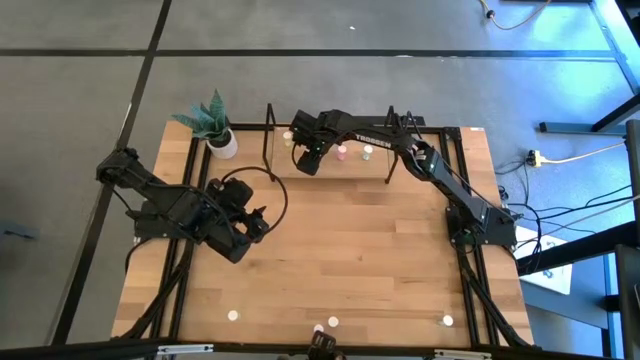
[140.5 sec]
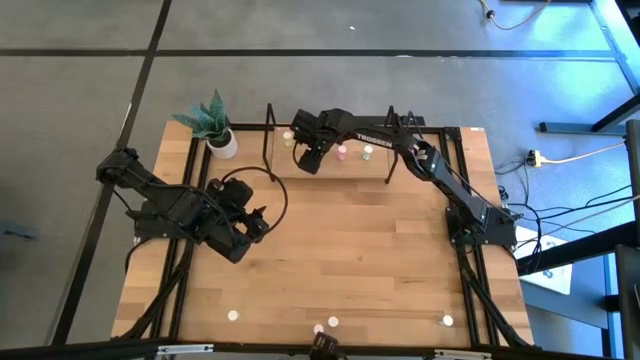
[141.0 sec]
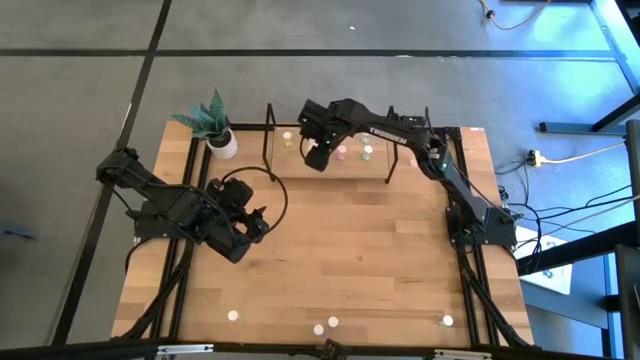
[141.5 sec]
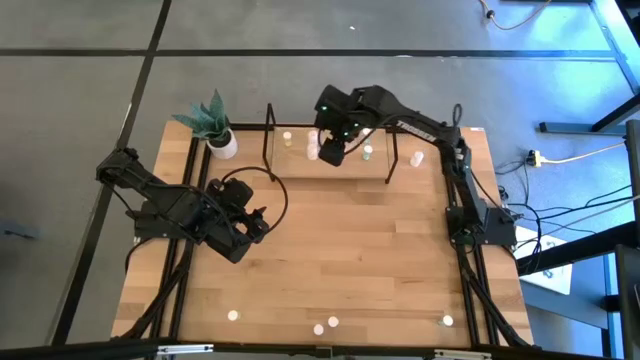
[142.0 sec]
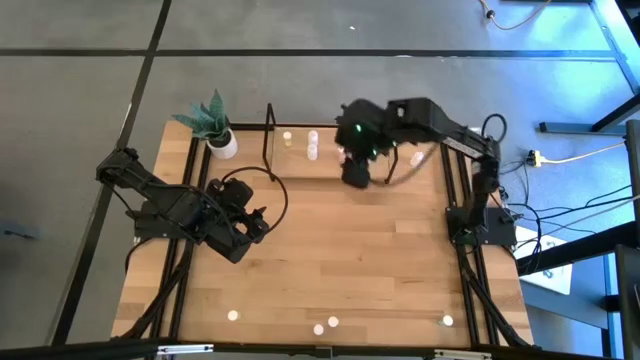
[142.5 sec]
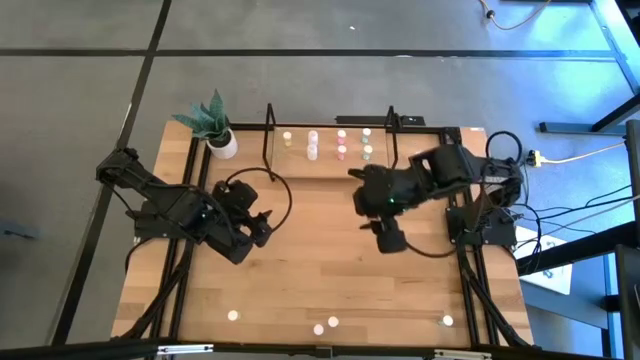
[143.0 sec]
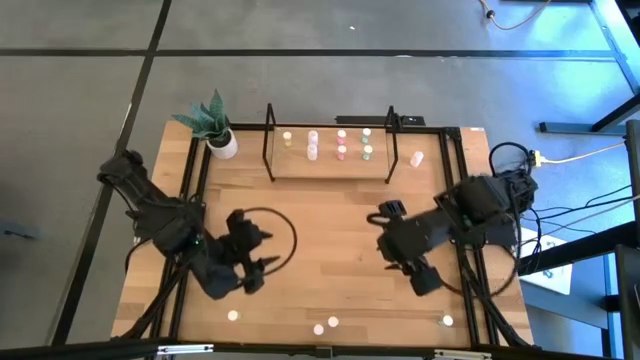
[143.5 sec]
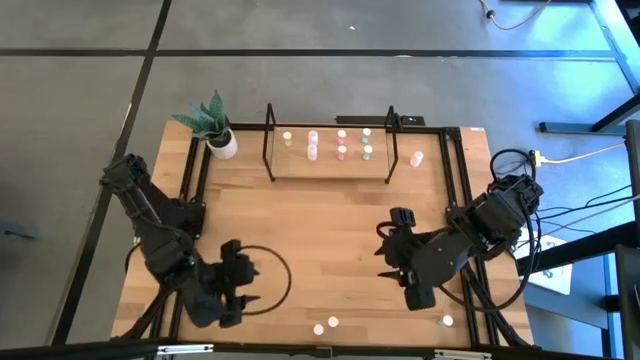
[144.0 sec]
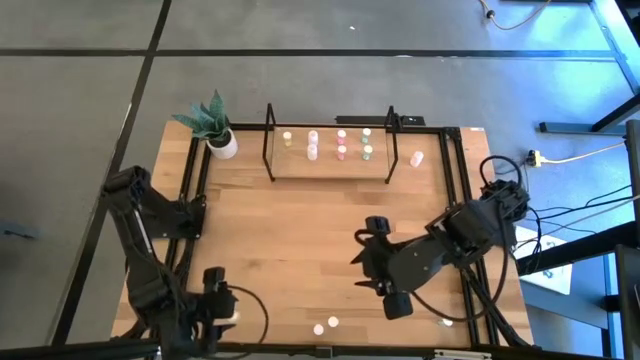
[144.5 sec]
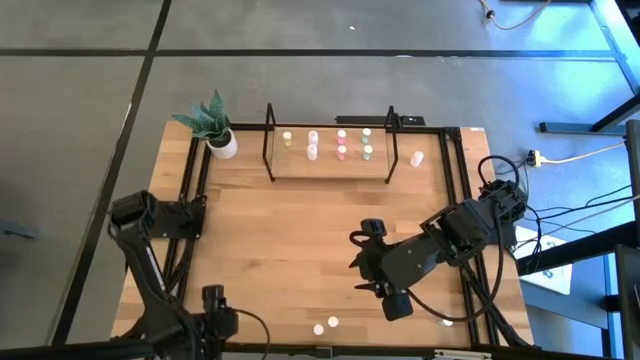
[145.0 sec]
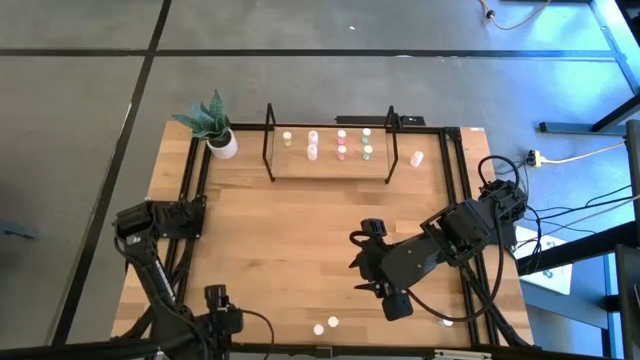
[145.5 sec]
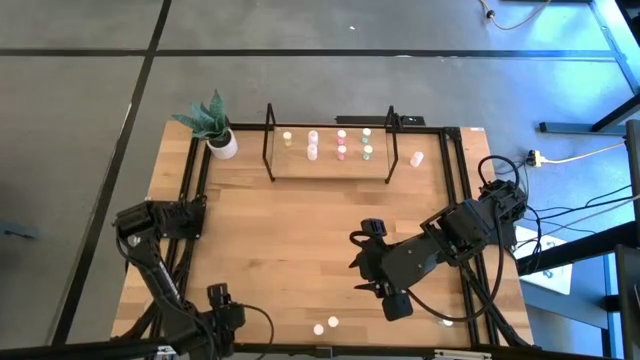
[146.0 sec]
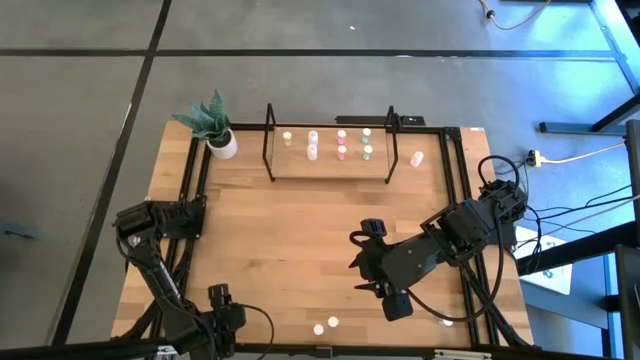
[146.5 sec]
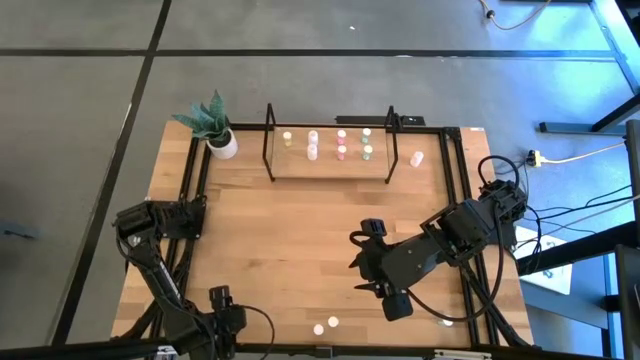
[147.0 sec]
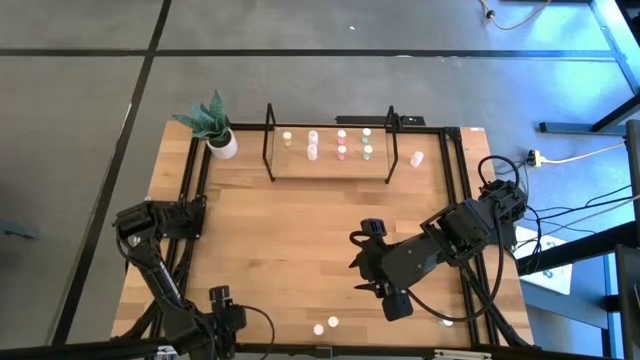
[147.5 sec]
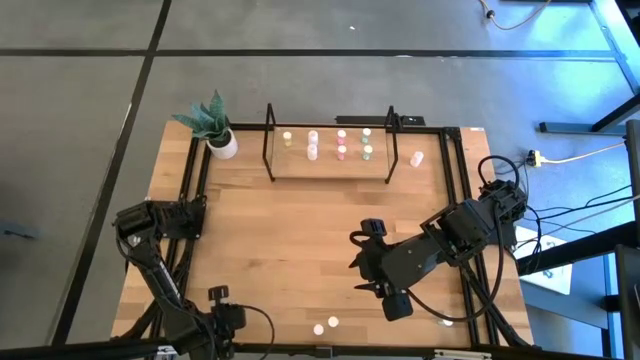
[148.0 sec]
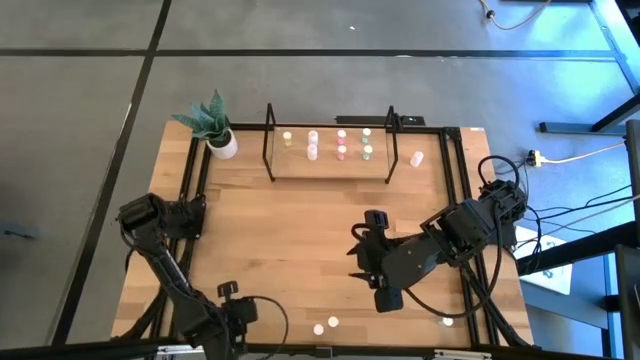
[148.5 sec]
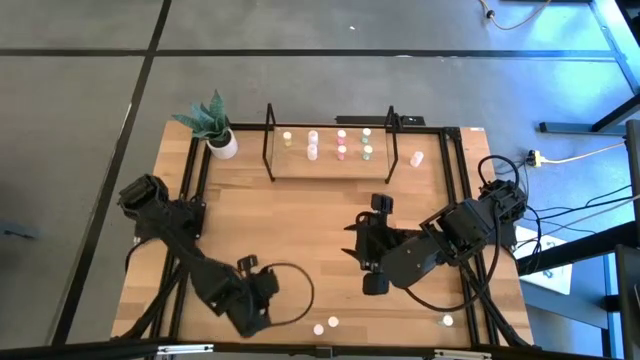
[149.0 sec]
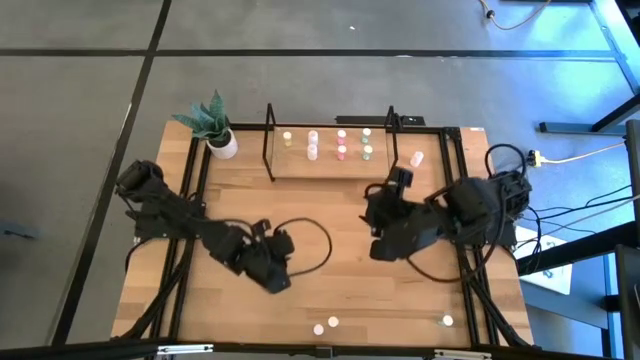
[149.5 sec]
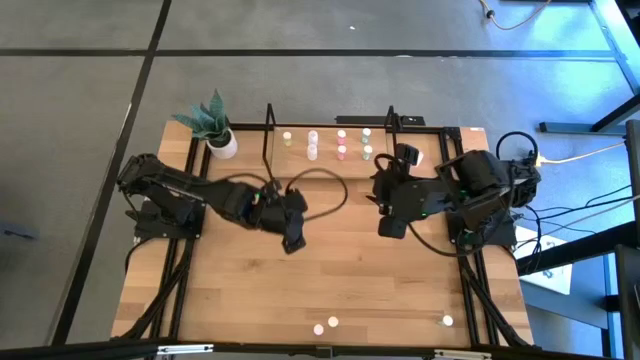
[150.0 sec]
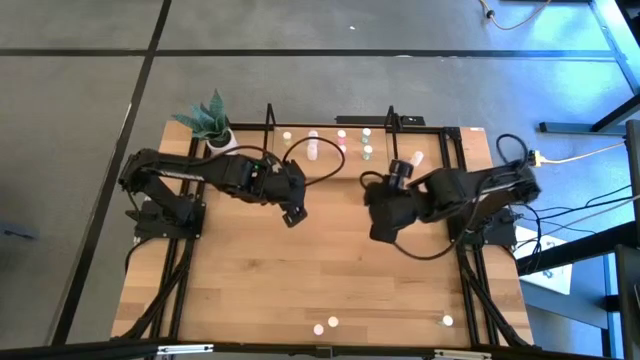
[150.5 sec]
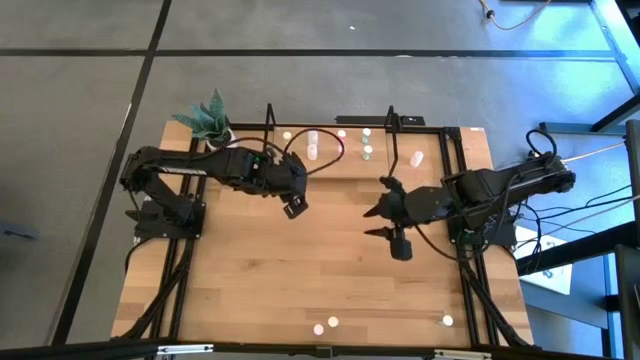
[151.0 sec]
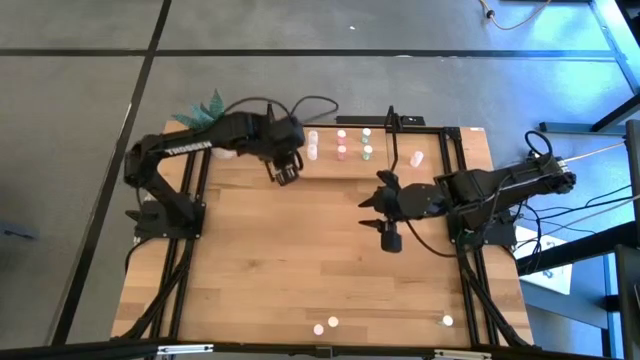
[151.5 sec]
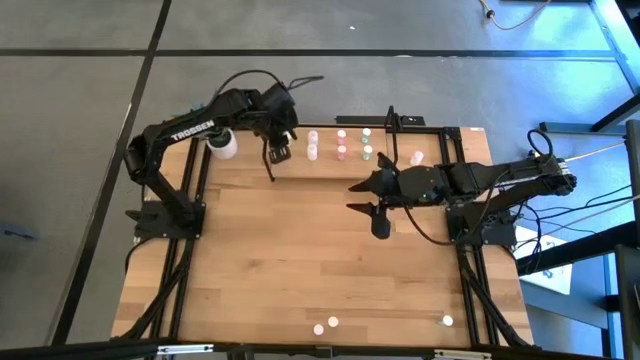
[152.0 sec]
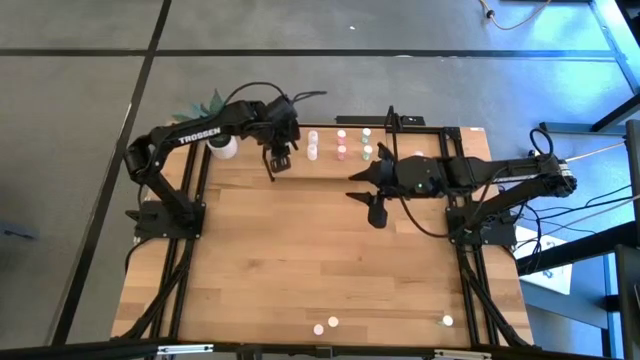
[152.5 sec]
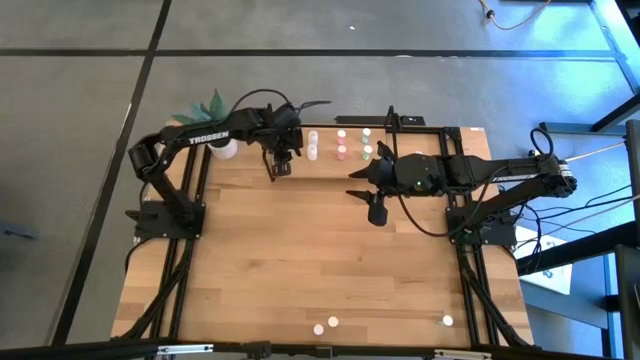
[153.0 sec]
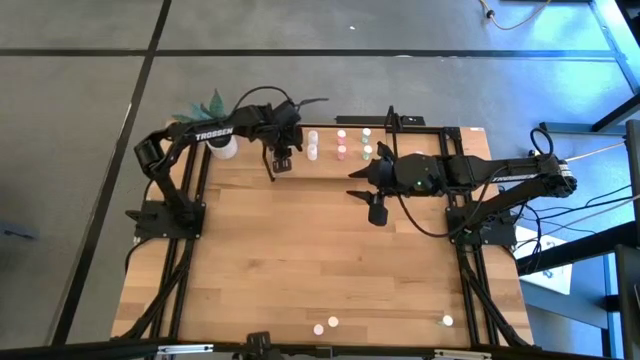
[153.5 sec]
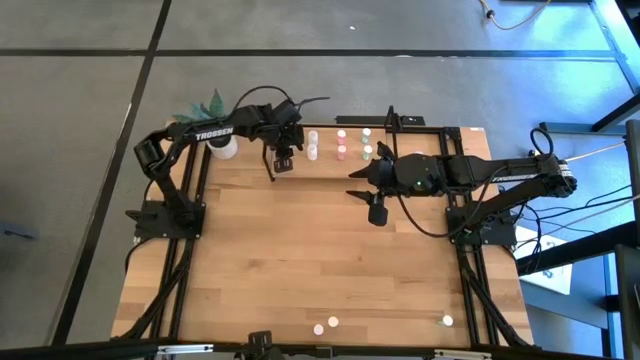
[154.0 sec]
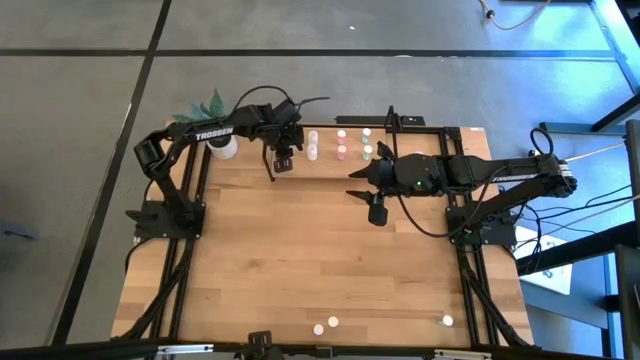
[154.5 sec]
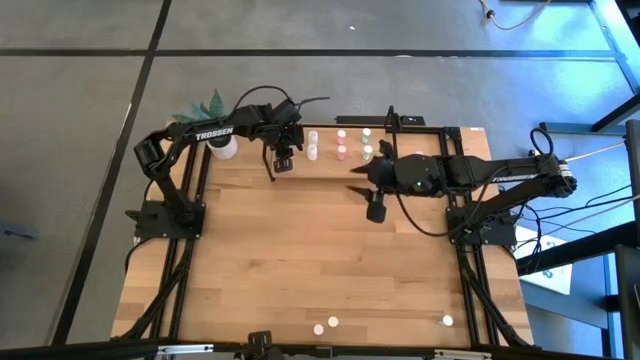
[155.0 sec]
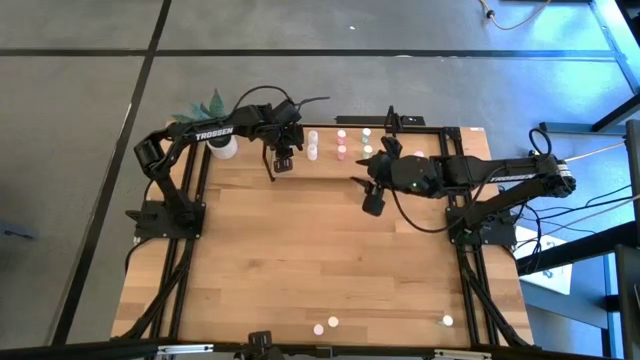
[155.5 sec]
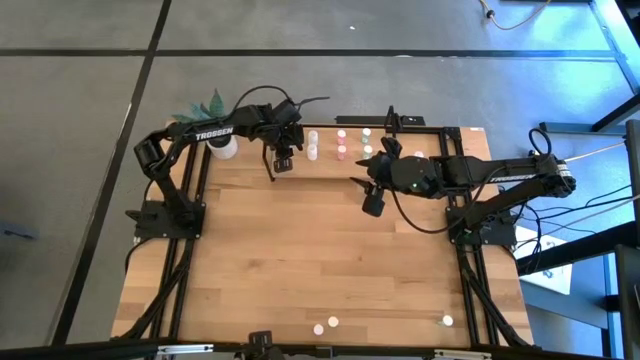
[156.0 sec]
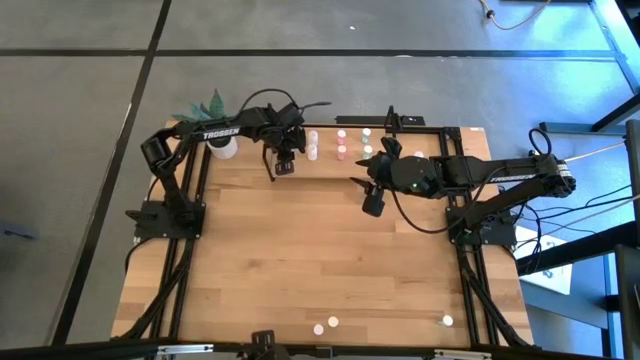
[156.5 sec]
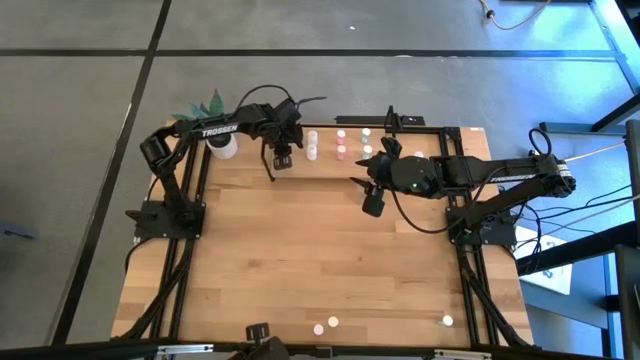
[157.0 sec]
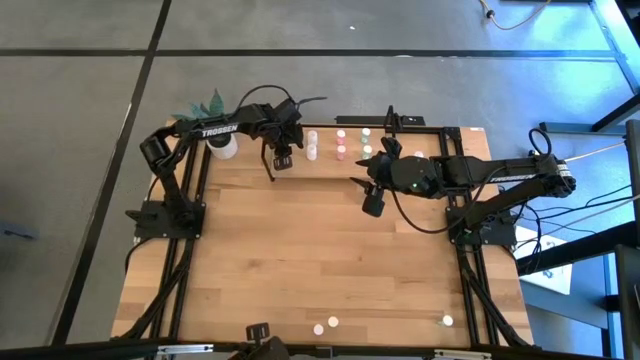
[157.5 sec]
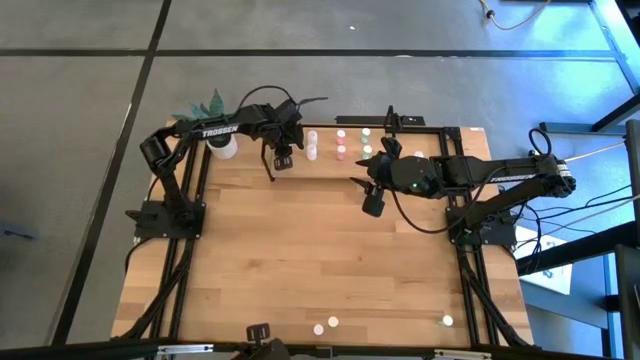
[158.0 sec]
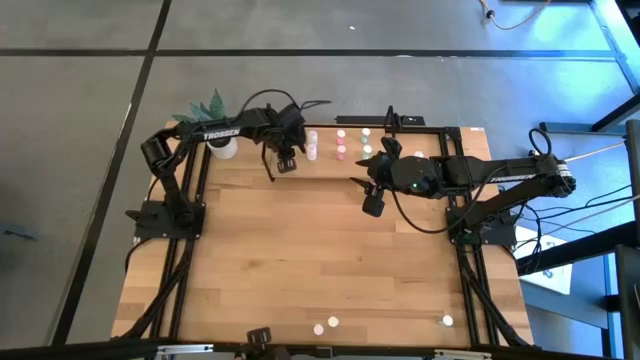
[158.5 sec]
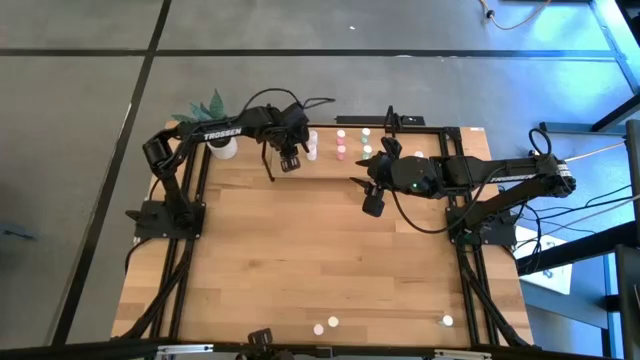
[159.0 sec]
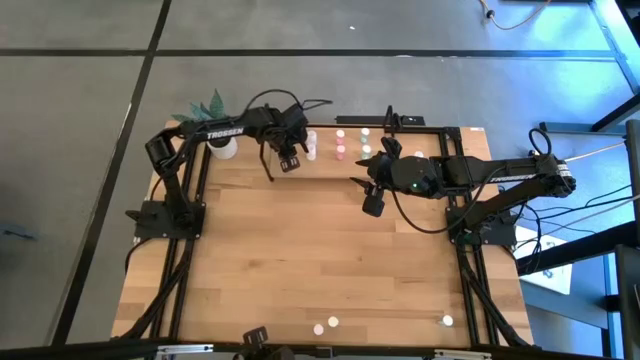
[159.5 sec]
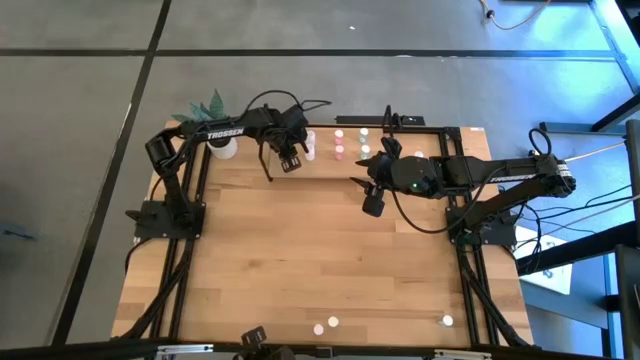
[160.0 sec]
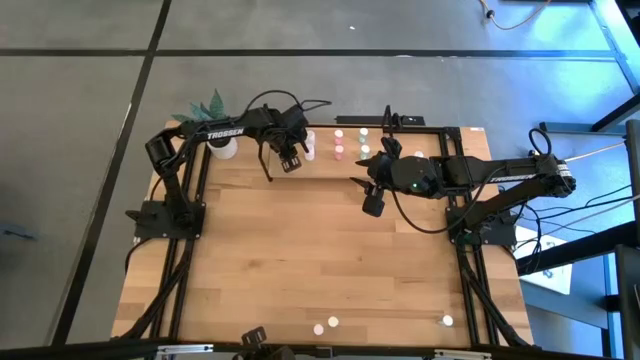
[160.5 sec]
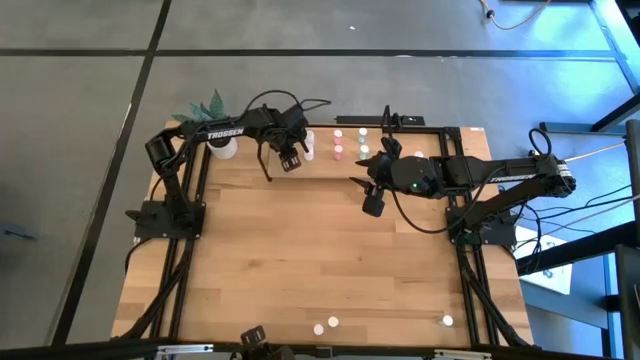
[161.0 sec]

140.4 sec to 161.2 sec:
Task: Pick and place medicine bottles onto shelf by color
Put the left yellow pill bottle on the shelf aligned with the other yellow pill bottle
